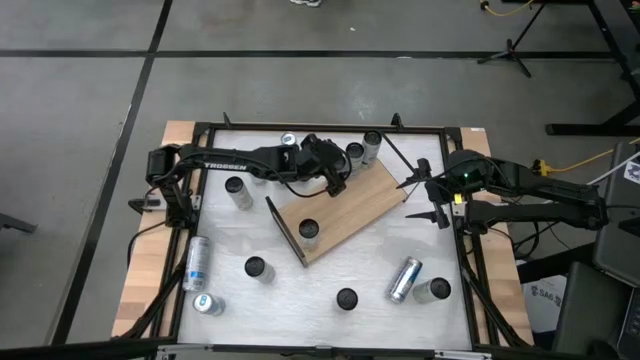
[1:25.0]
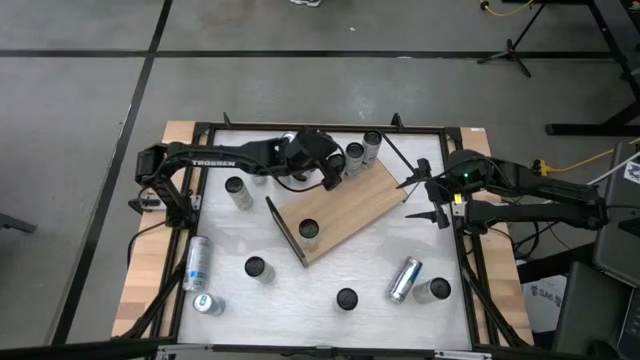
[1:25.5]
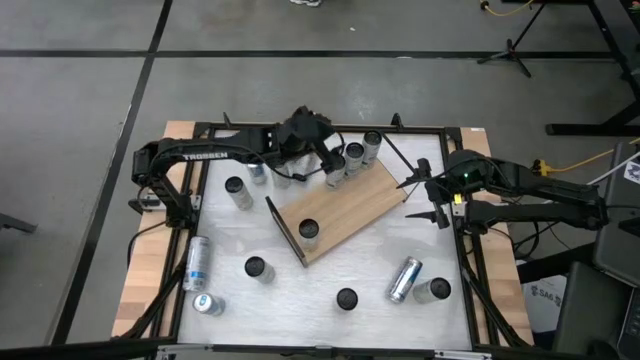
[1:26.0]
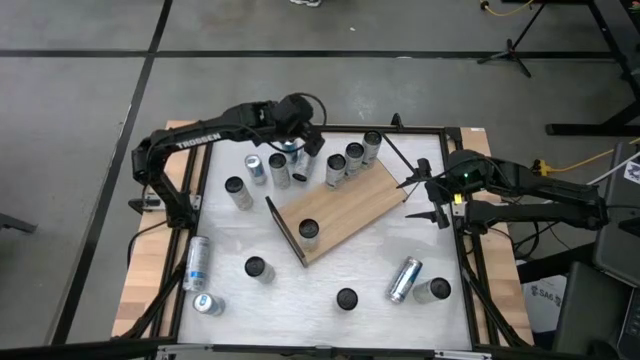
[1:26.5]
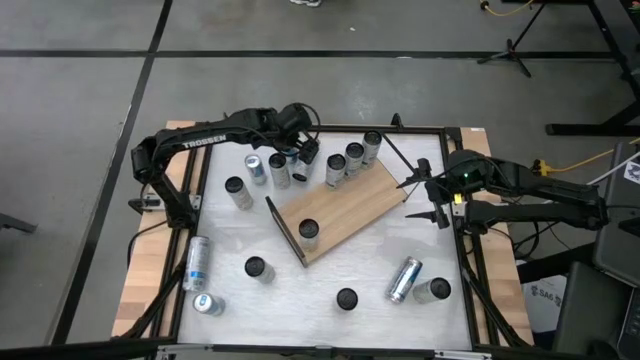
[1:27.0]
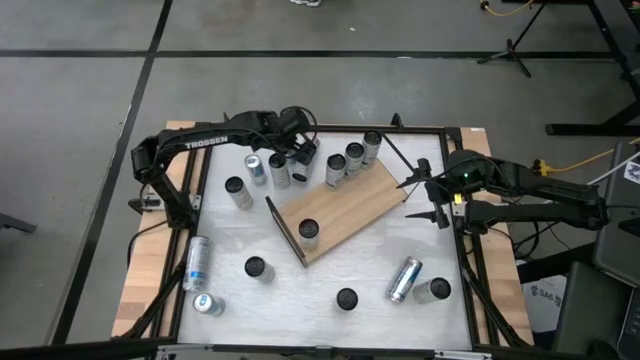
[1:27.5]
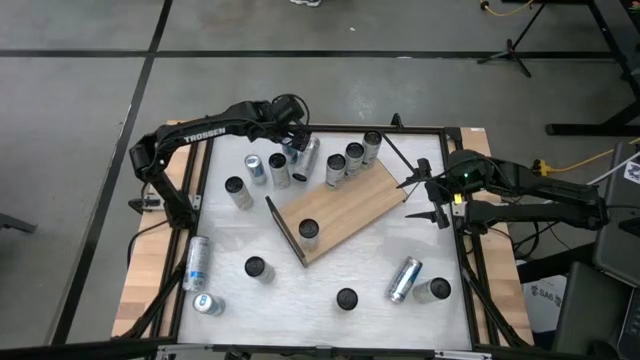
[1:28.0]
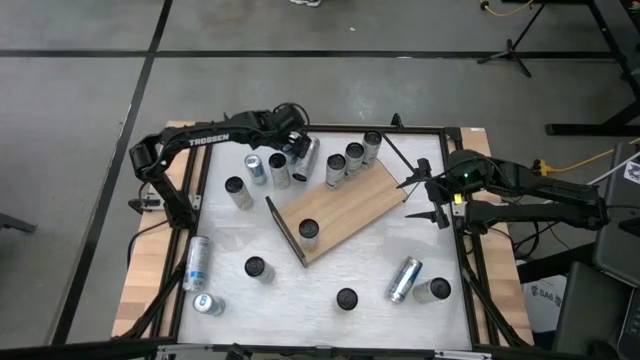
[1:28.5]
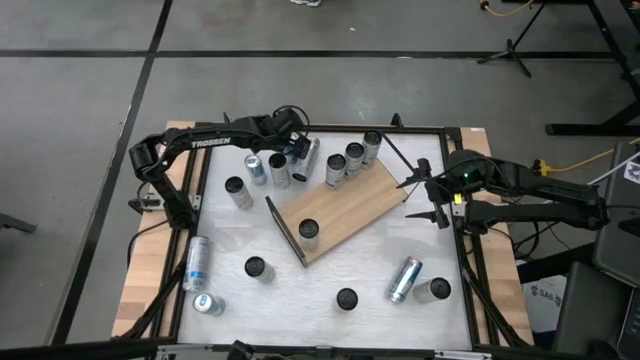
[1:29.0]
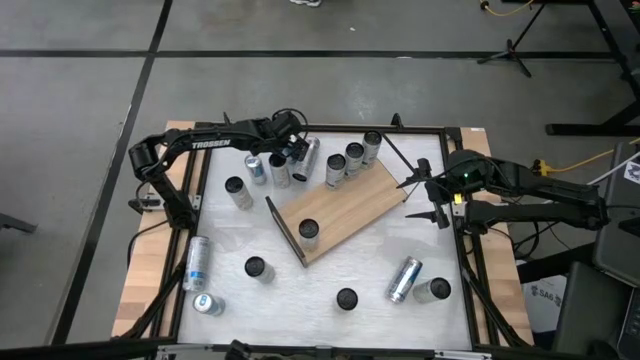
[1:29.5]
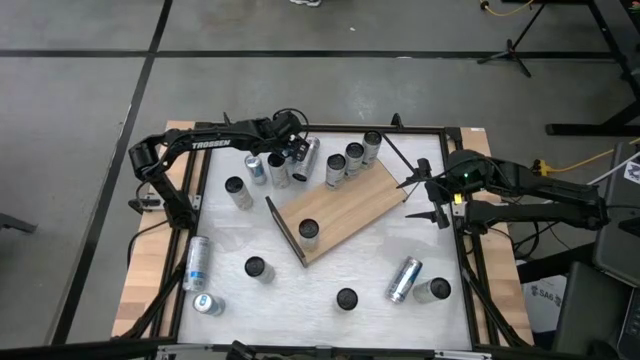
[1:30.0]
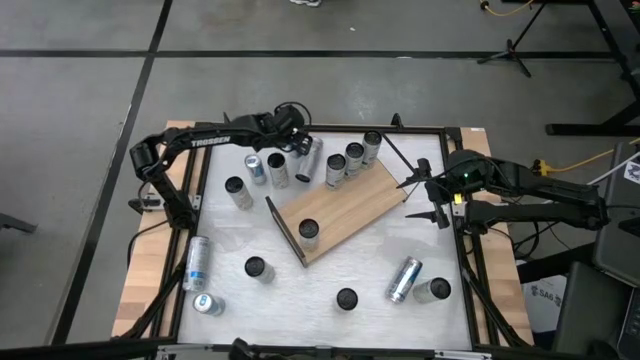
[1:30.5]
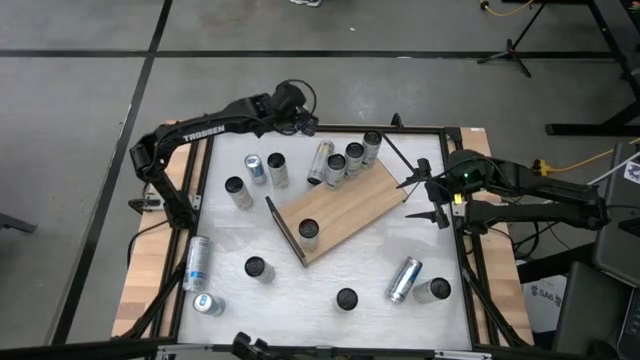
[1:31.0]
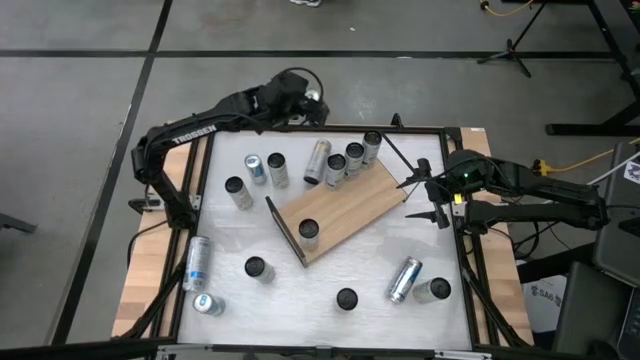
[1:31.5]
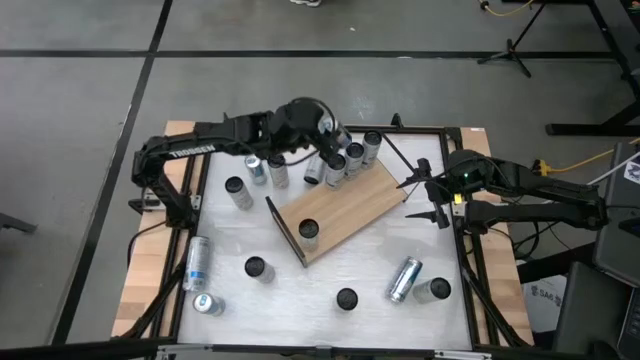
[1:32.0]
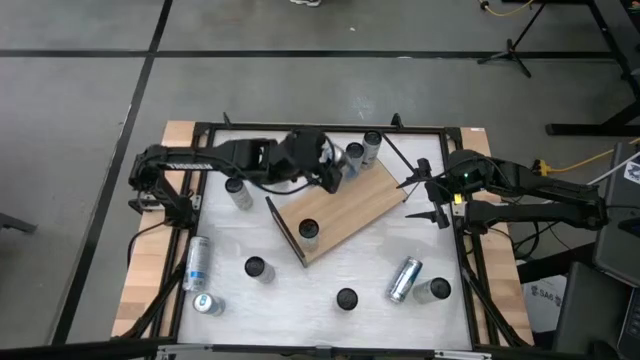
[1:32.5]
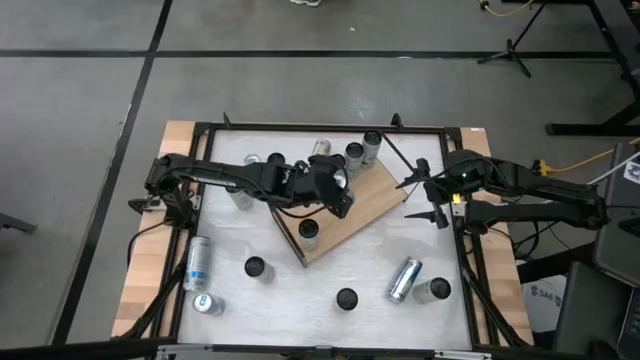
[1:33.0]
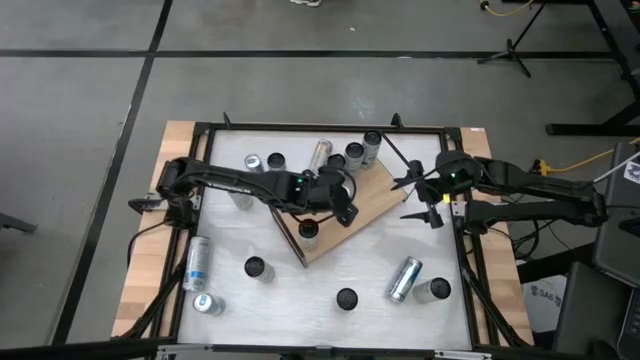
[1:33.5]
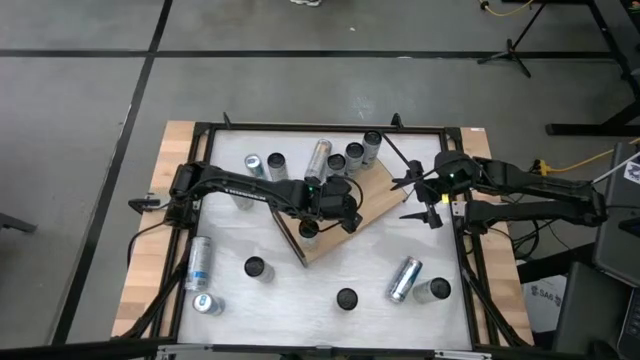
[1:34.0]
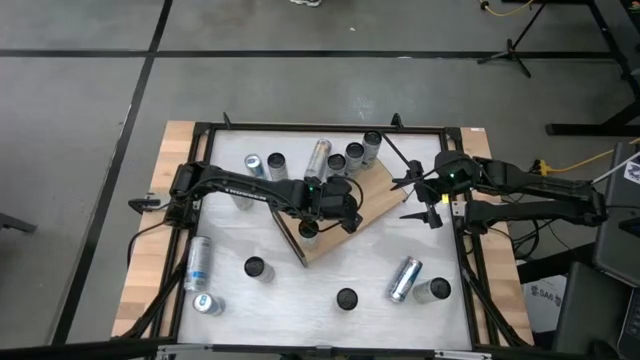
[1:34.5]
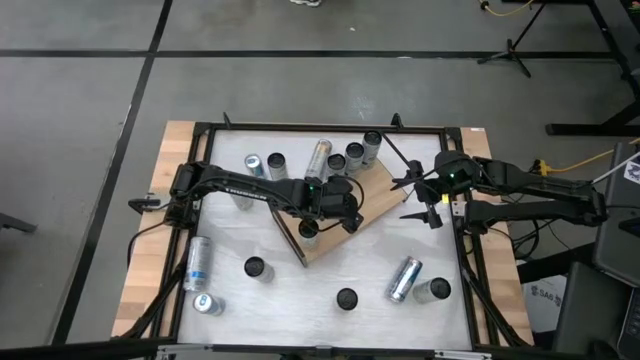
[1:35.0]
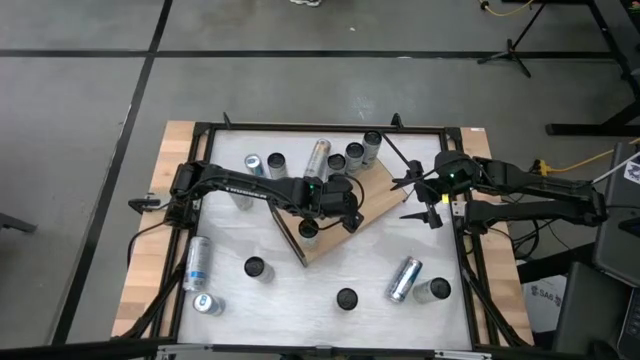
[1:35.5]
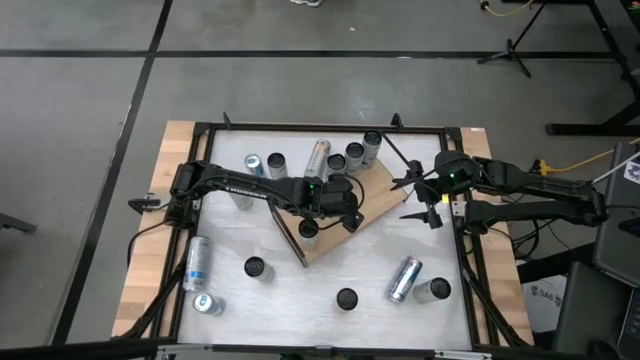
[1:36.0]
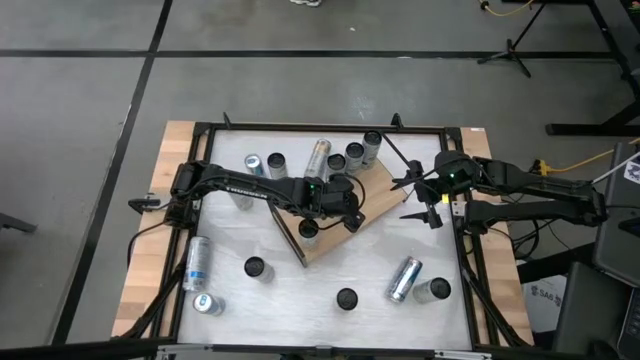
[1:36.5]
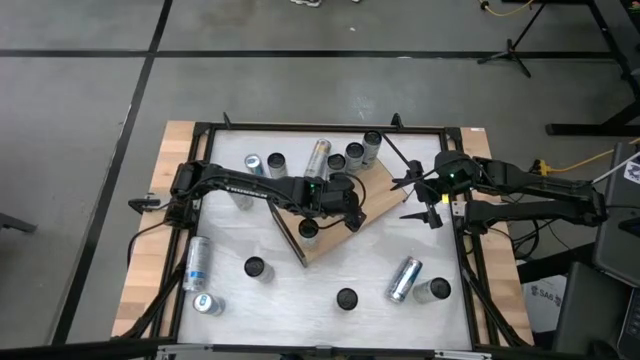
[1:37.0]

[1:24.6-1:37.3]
Task: Place canned beverage on shelf
Put the blue soda can on the shelf

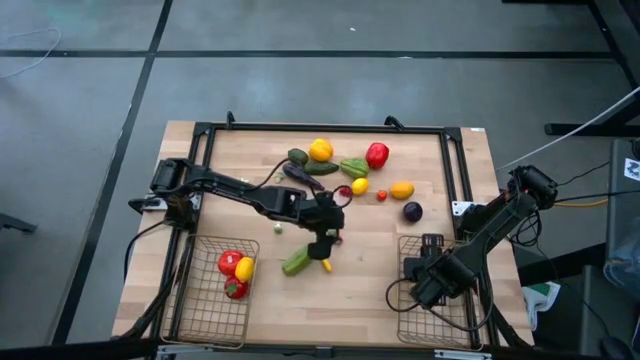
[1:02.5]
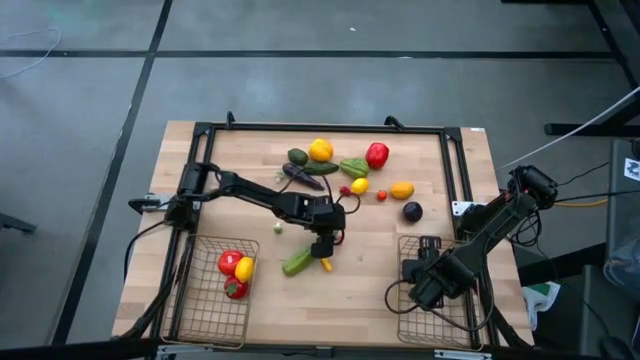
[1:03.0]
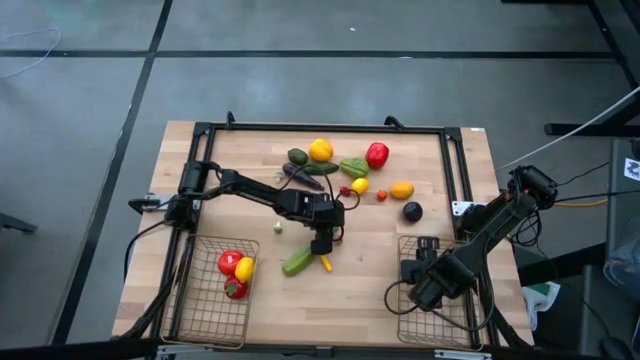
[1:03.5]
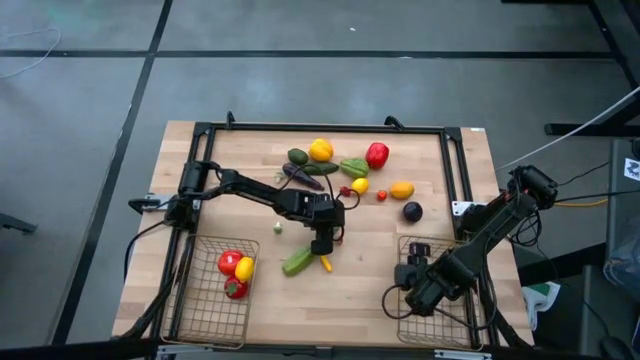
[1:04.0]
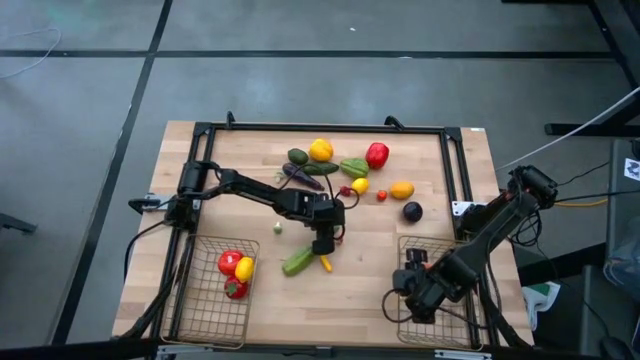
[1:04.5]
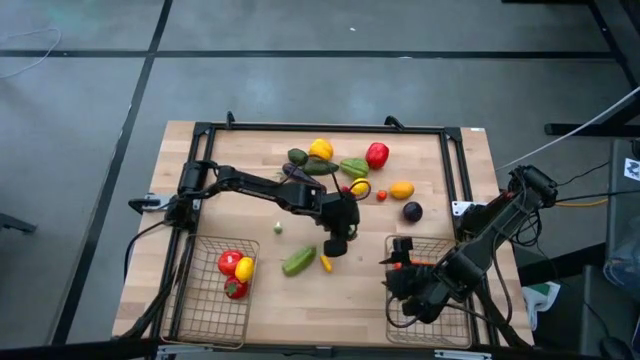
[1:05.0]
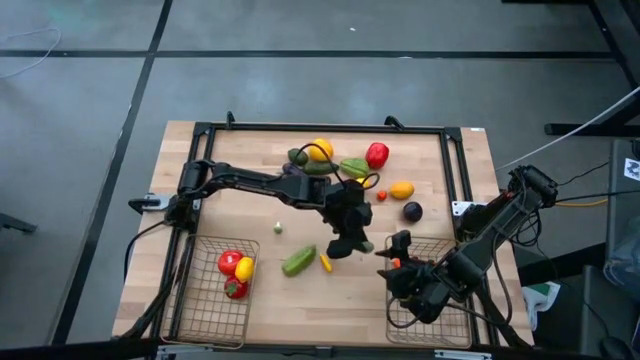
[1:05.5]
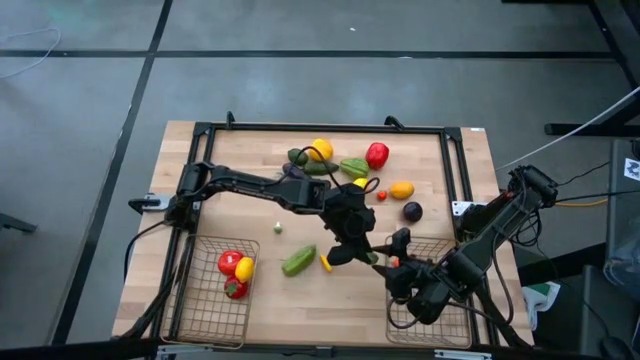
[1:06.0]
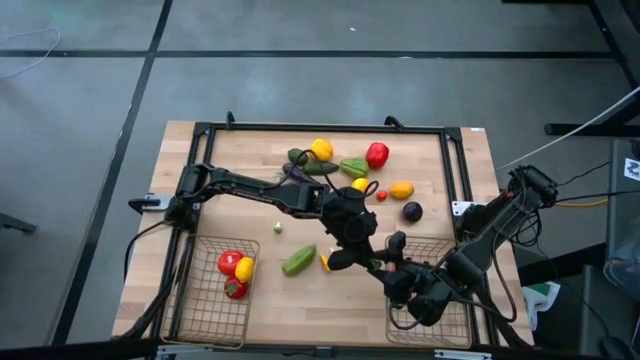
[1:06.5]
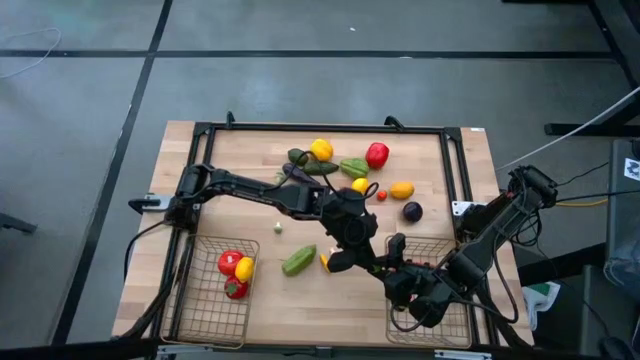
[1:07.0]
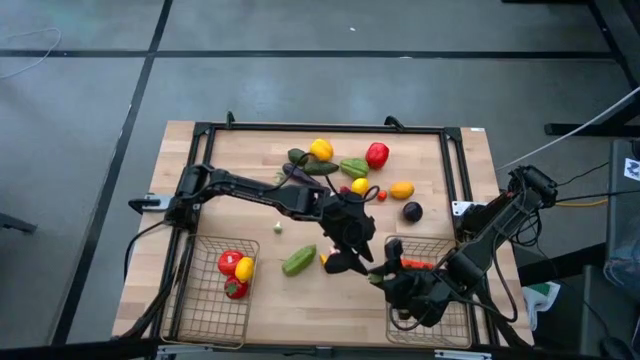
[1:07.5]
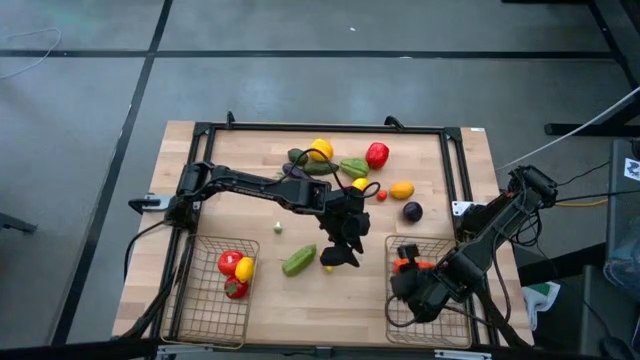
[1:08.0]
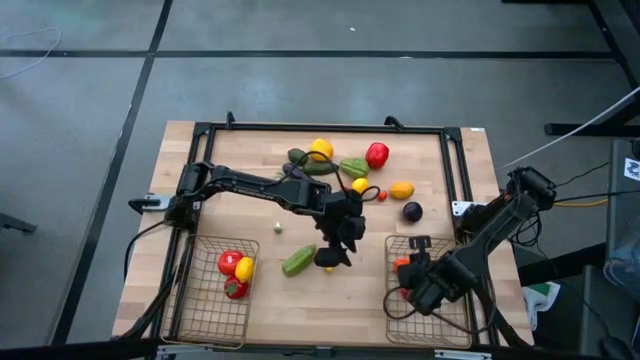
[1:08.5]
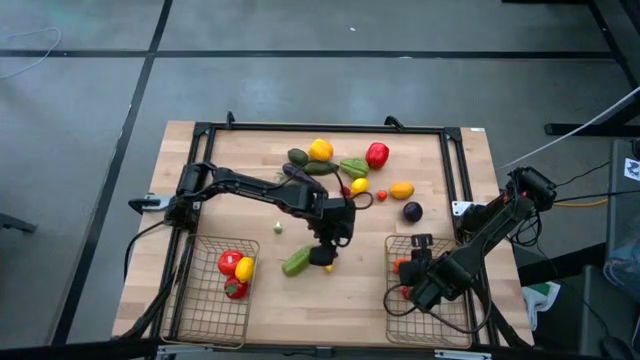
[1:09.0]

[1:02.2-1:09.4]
Task: Sort produce into baskets
Put the small green chilli pepper into the right wire basket

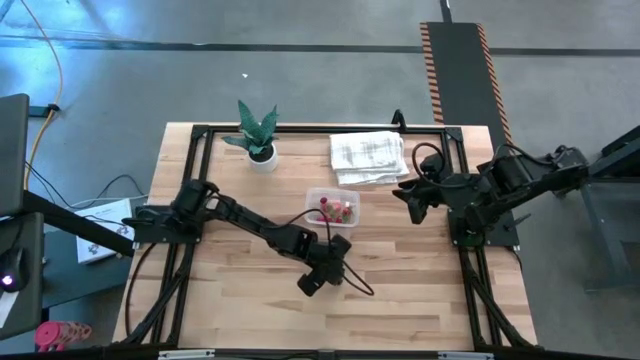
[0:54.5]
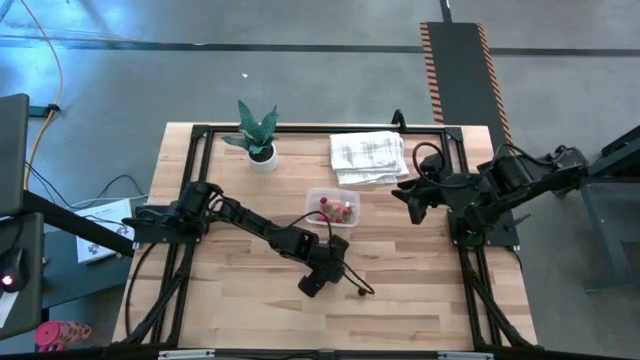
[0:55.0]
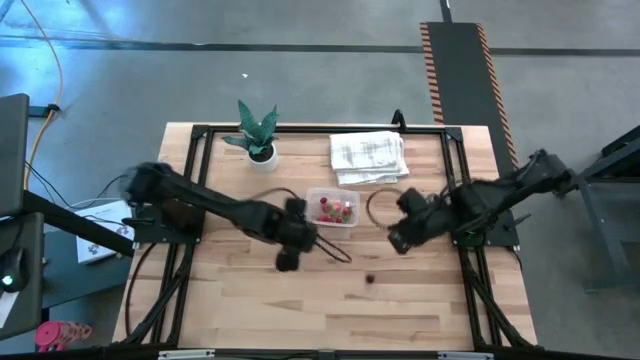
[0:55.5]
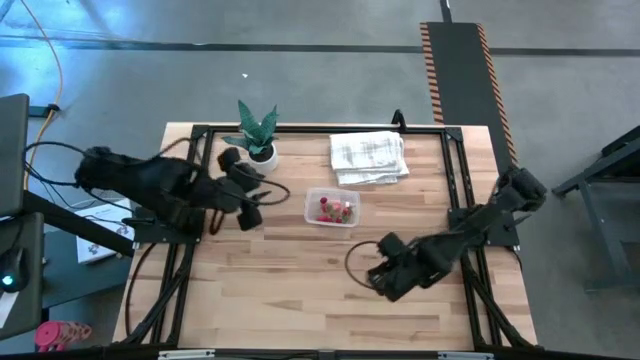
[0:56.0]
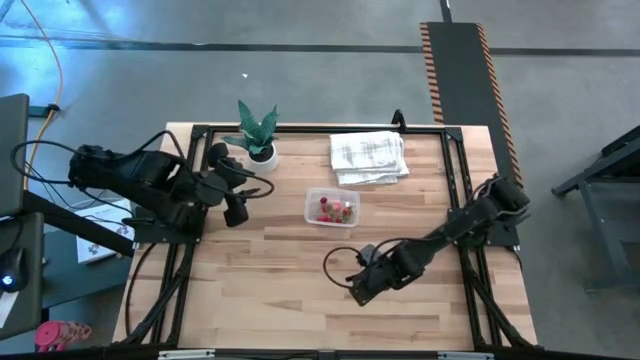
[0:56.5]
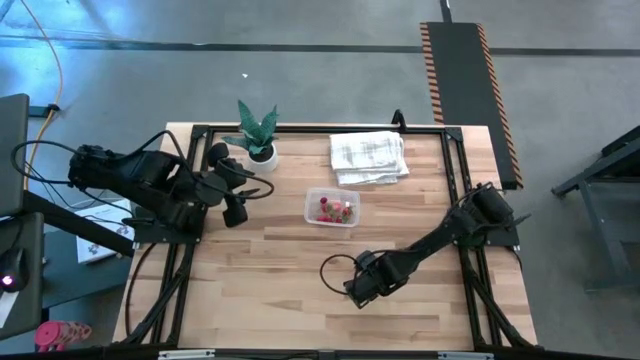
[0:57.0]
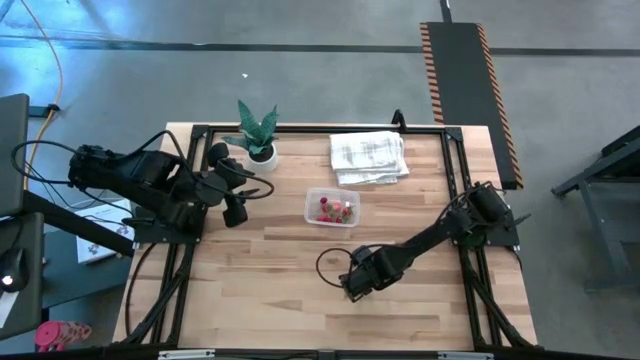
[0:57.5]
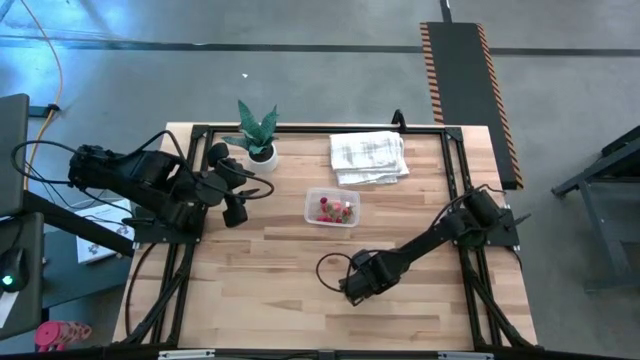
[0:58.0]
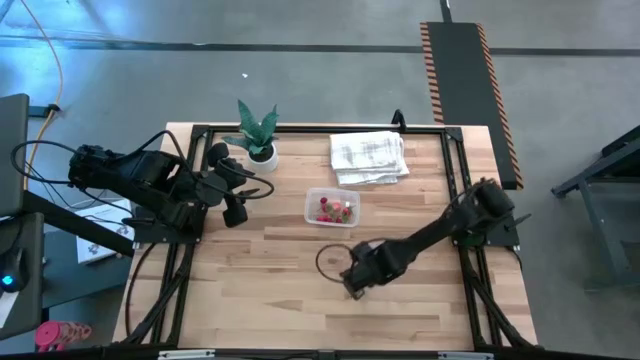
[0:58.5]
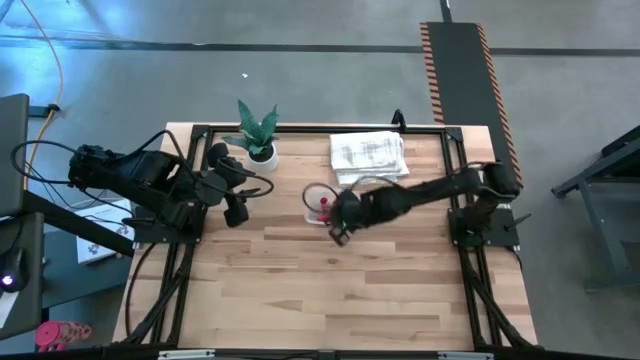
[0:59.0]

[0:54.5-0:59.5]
Task: Pick and placing Produce into tupperware
Put the cherry into the transparent bin
